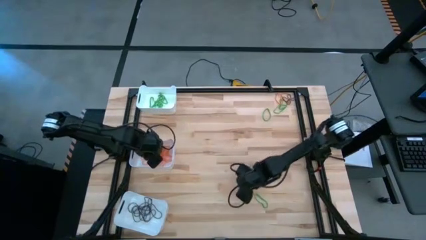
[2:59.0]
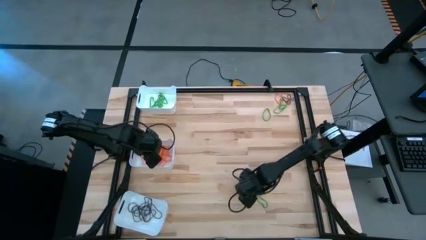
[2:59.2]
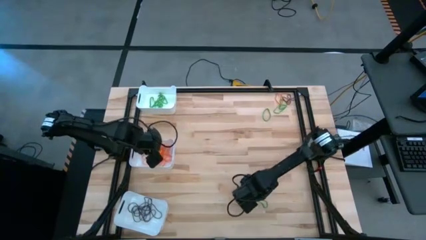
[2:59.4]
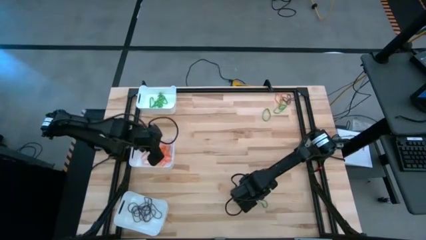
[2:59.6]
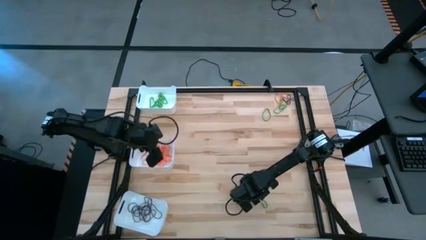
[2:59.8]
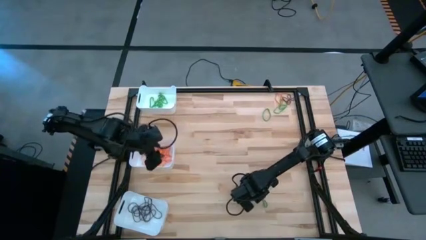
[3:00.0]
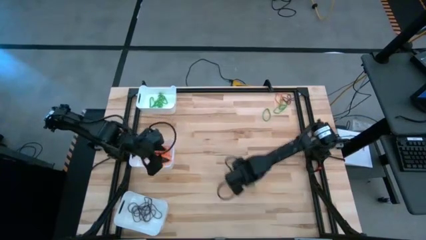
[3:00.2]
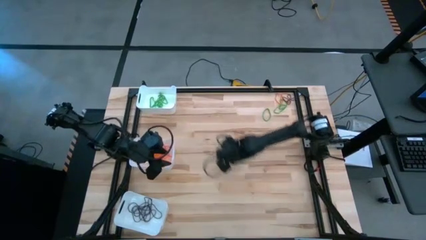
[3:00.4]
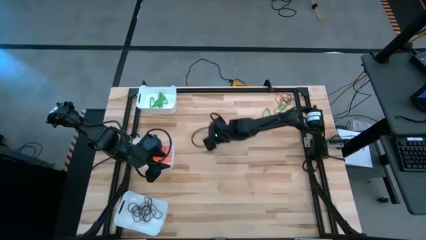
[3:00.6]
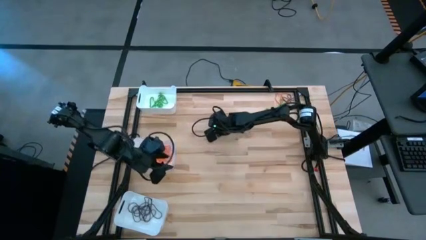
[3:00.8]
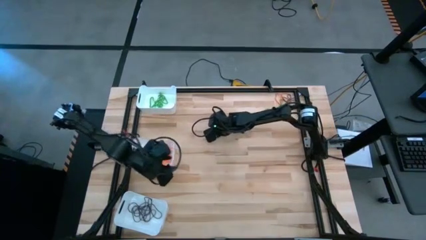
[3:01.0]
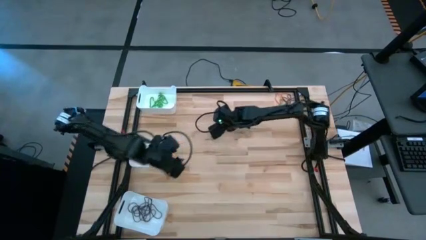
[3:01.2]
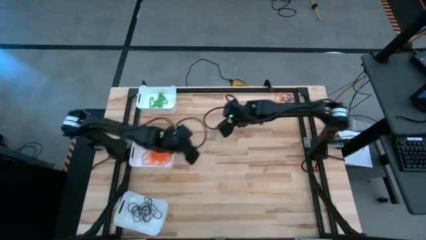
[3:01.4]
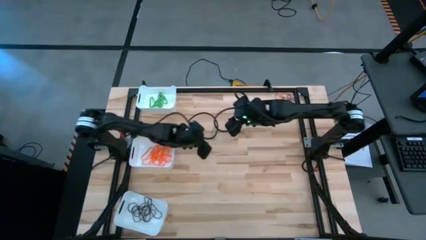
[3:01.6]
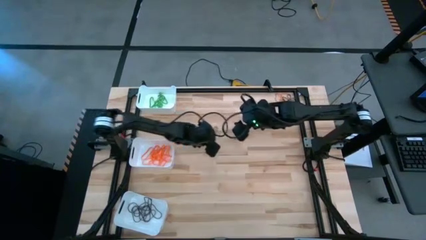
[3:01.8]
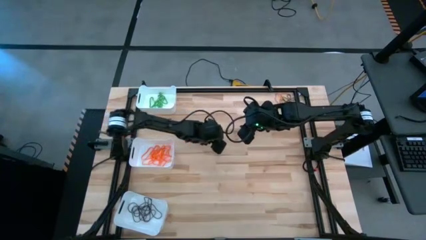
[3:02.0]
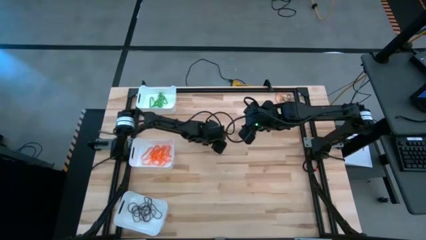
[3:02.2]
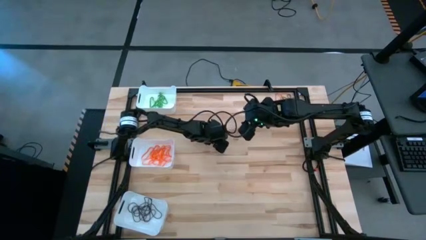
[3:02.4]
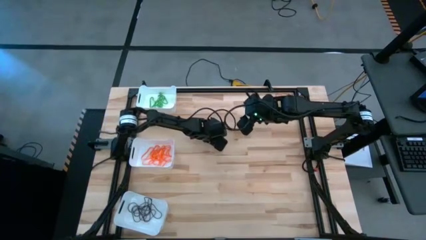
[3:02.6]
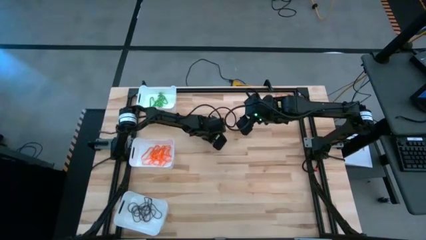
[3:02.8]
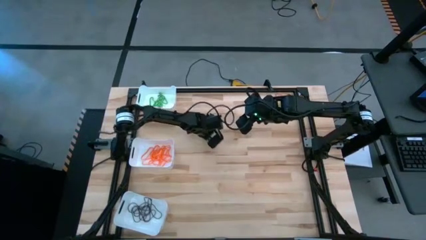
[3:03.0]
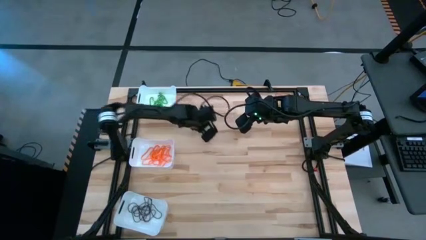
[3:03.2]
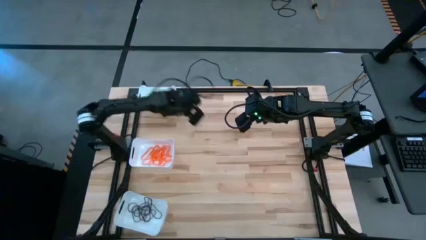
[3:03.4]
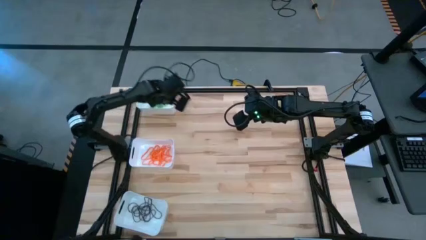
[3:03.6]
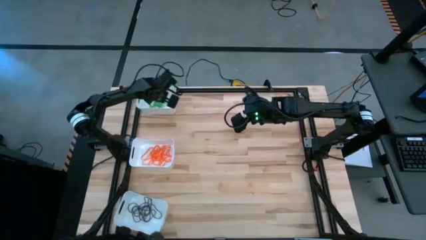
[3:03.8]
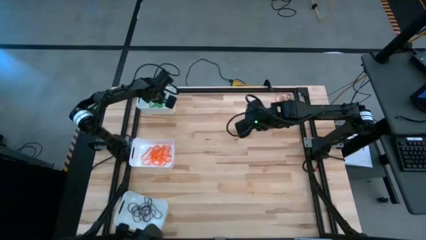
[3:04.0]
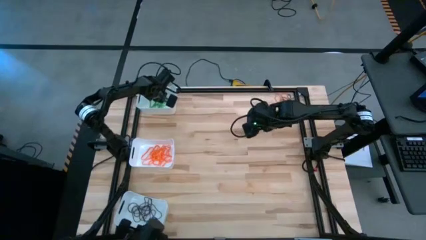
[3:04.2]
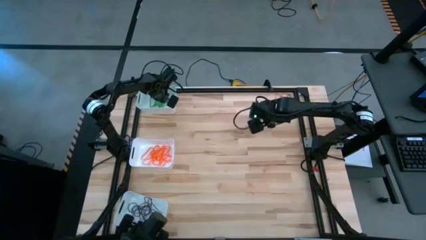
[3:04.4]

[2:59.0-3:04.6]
Task: Sort rubber bands into baskets
Put the green rubber band into the top white bin

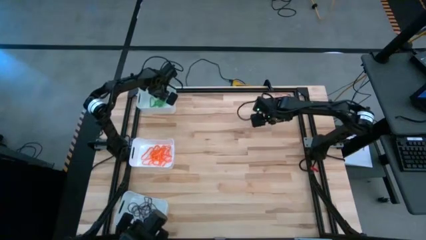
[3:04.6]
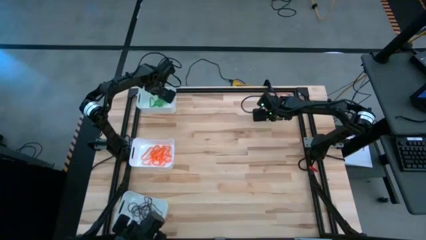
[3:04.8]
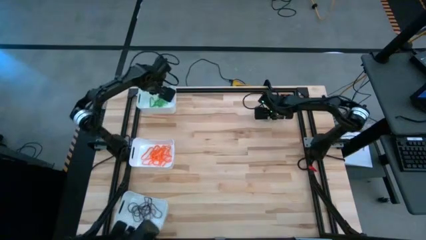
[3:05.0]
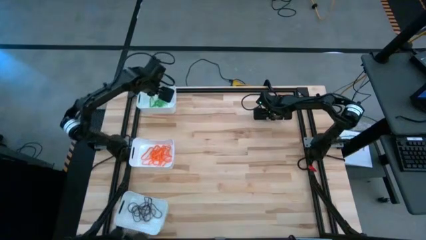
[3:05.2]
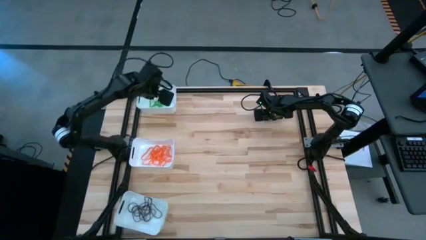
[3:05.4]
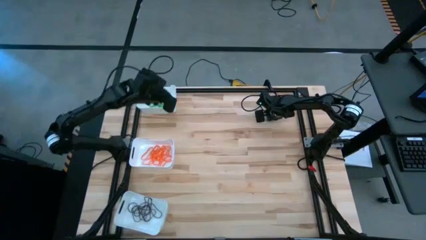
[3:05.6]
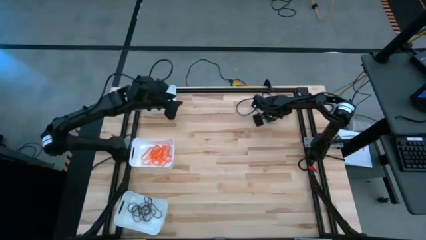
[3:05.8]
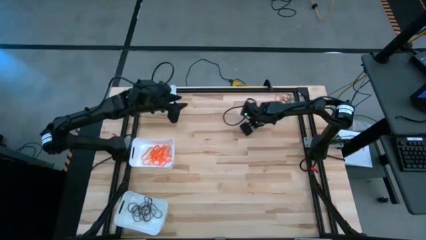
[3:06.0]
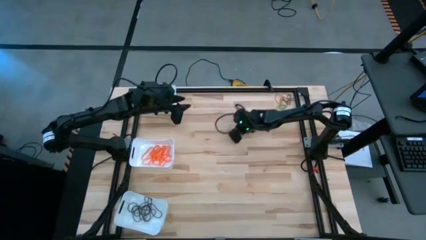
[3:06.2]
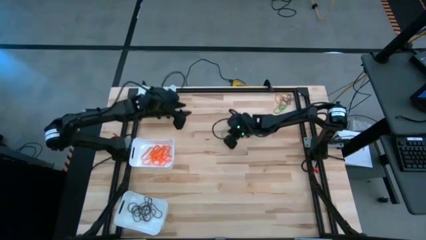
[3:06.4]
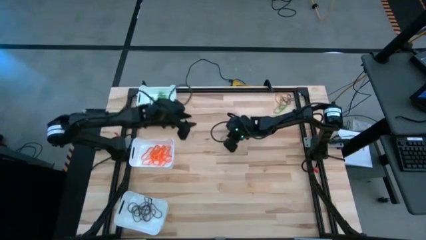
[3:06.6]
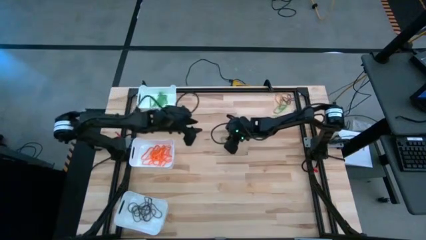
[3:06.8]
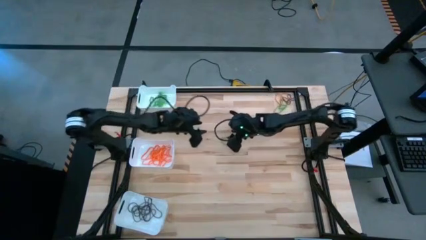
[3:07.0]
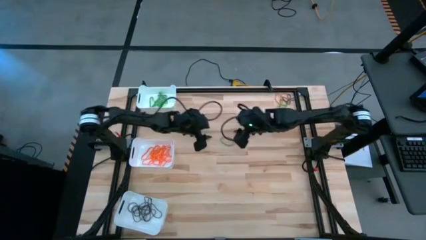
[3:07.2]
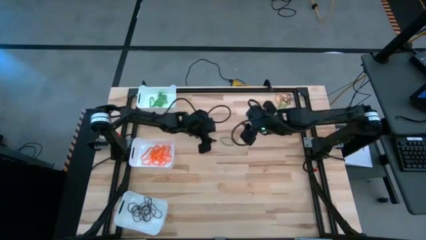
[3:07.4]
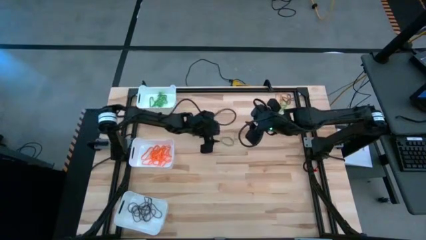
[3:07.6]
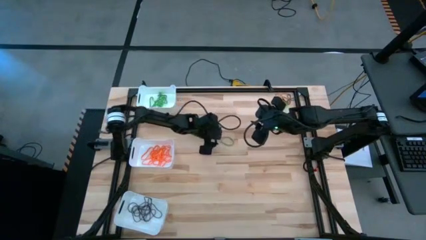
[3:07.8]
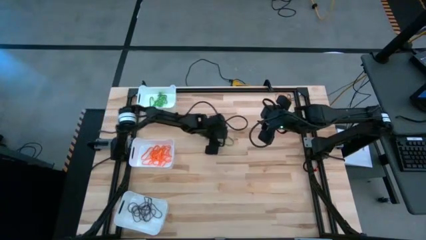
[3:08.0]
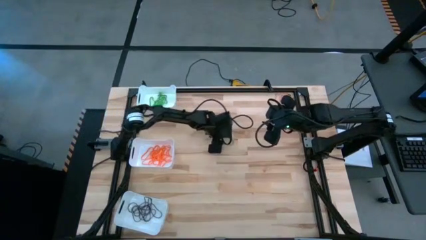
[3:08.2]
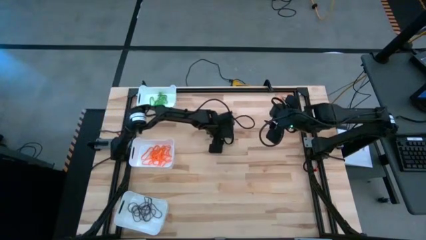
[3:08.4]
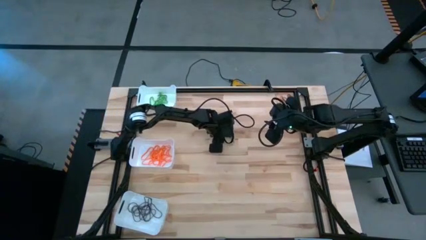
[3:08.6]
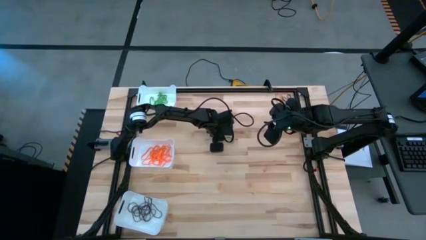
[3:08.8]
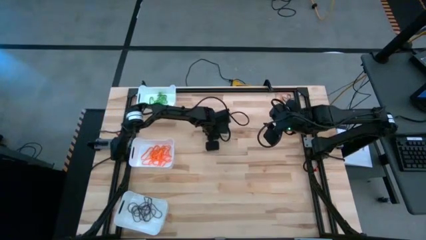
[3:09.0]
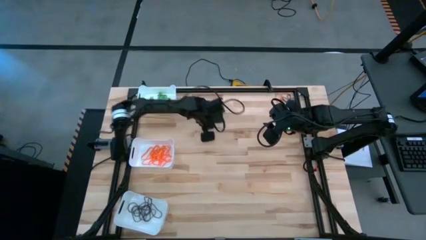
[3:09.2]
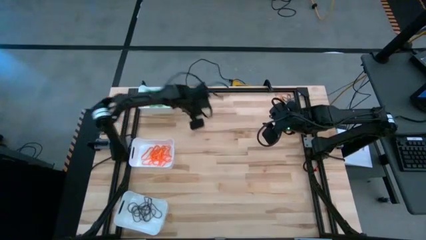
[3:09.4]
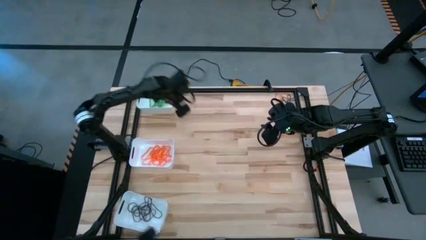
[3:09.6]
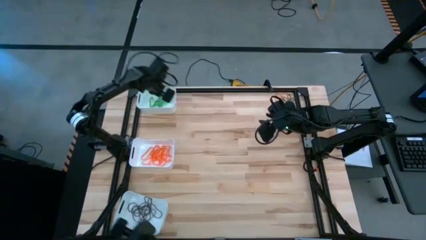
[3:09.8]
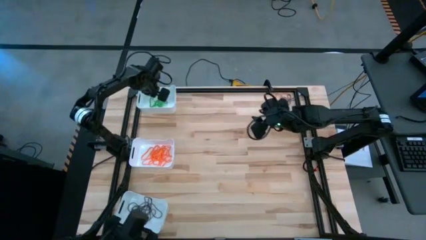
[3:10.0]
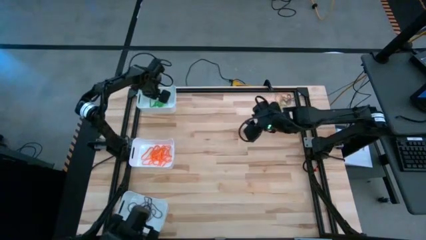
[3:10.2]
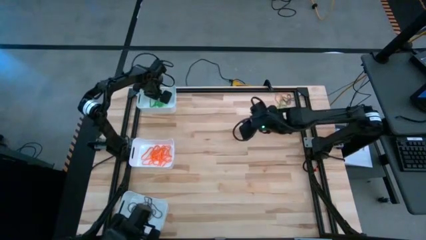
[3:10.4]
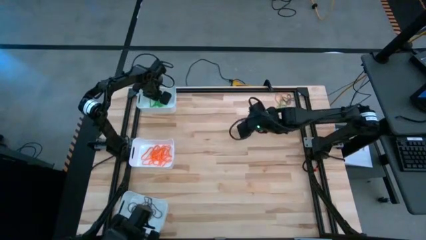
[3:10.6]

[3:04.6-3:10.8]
Put the green rubber band into the top white bin

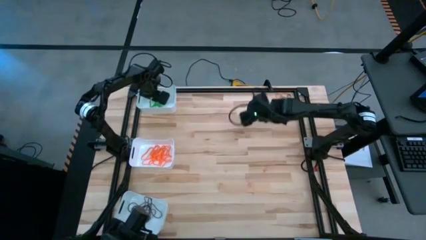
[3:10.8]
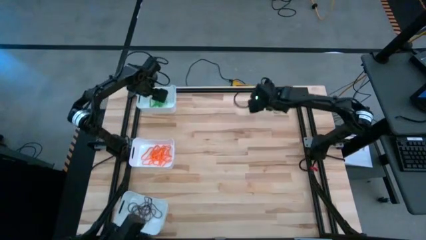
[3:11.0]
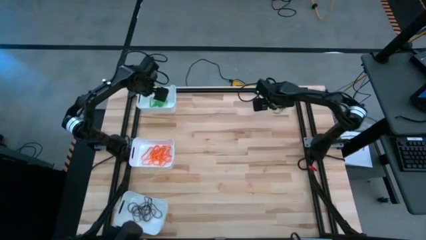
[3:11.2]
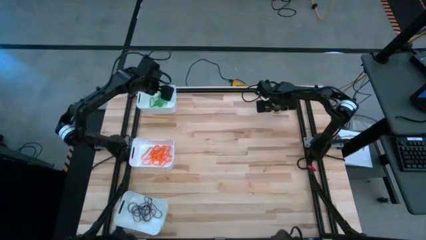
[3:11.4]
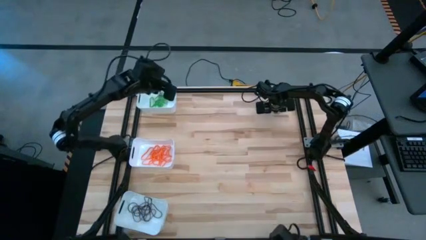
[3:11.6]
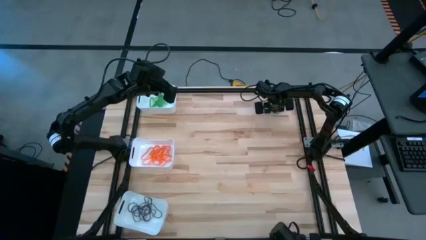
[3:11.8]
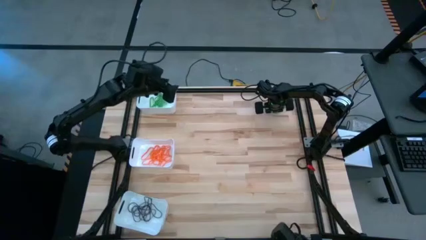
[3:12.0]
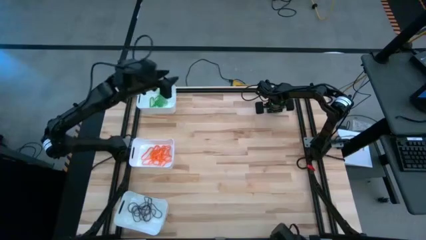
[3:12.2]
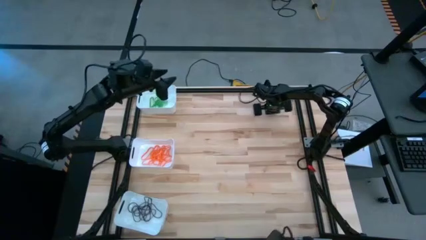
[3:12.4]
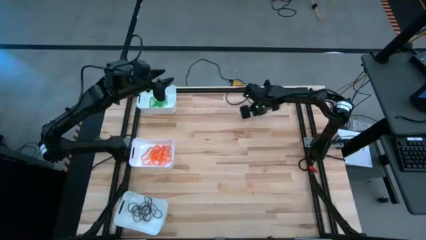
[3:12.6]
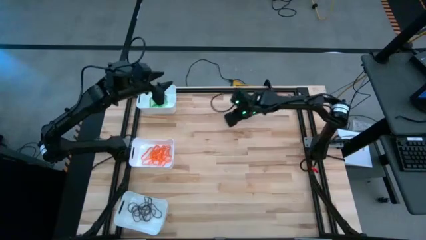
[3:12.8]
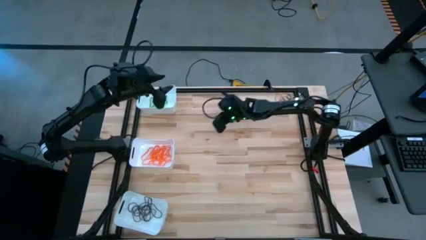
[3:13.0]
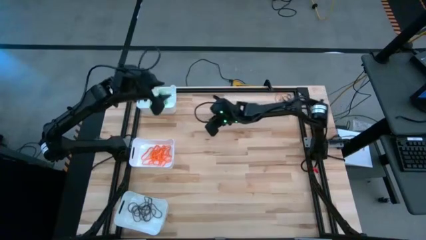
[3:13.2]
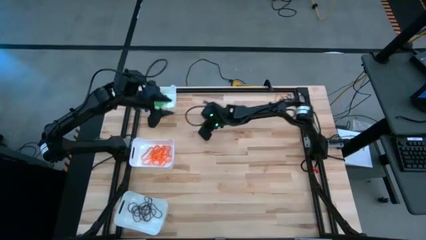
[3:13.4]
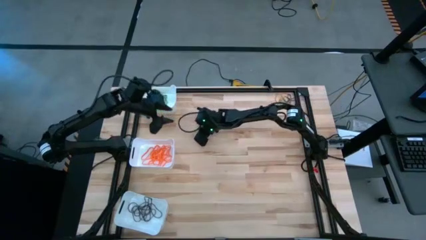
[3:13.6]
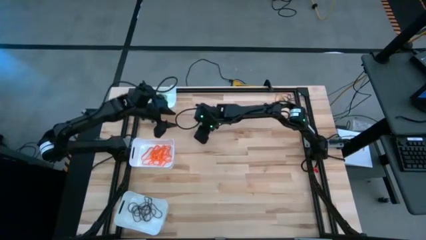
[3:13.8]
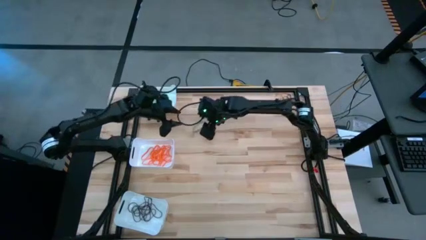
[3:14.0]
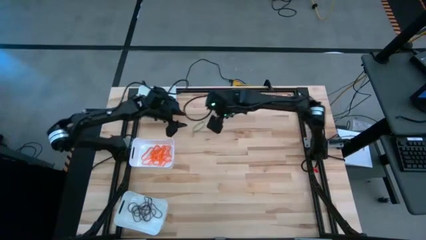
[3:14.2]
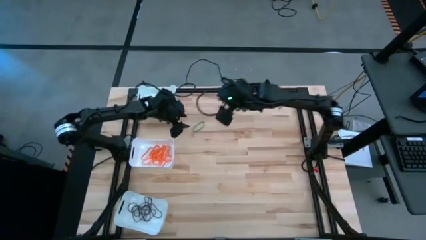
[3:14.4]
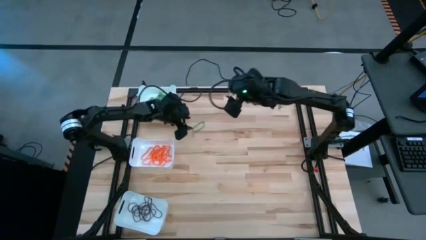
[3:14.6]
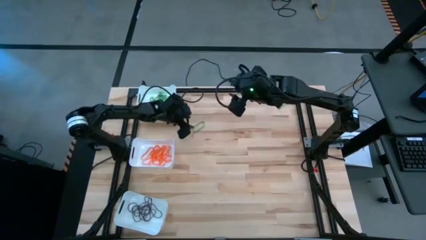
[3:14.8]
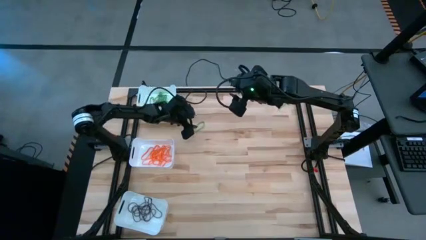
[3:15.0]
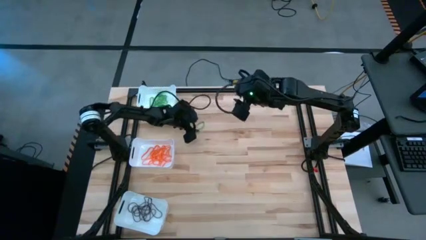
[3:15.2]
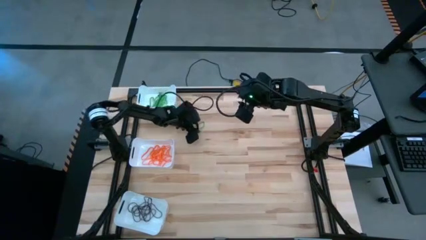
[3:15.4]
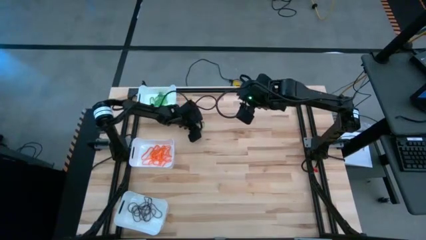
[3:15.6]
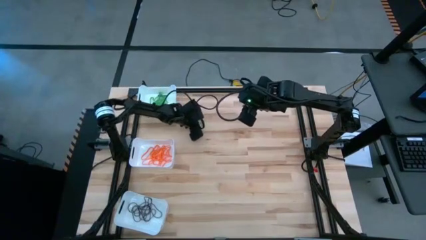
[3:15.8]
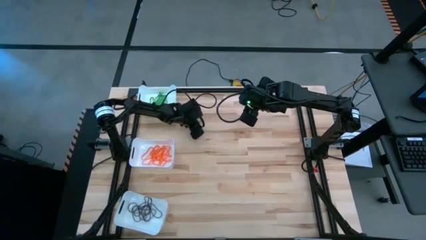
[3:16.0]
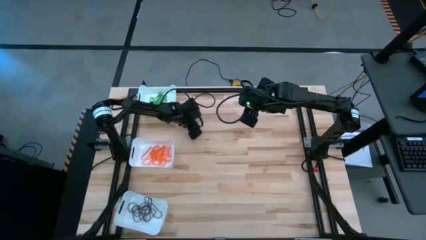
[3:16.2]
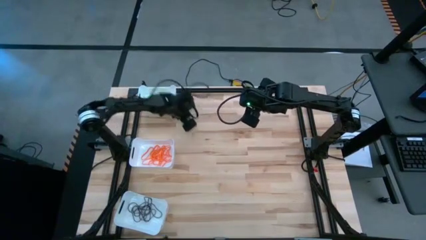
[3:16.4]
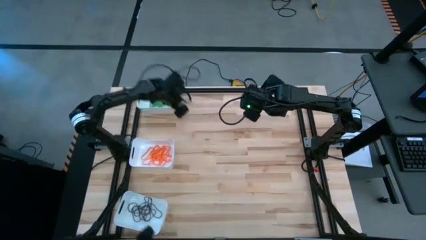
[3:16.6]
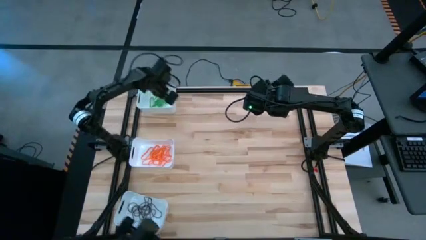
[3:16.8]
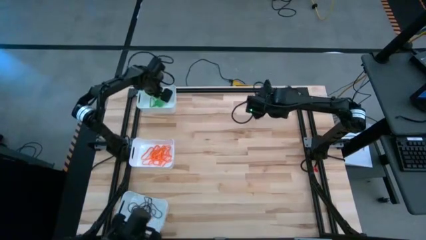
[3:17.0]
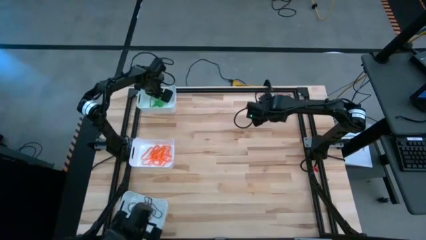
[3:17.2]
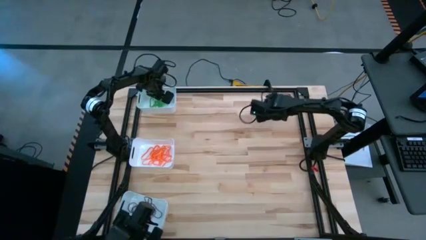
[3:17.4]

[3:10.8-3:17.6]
Put the green rubber band into the top white bin
